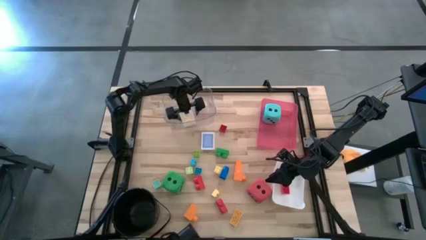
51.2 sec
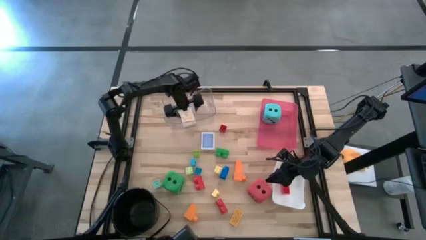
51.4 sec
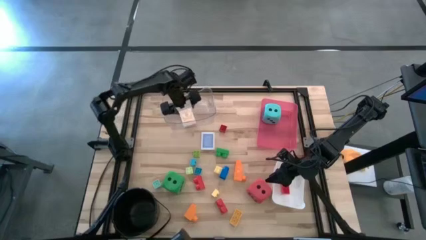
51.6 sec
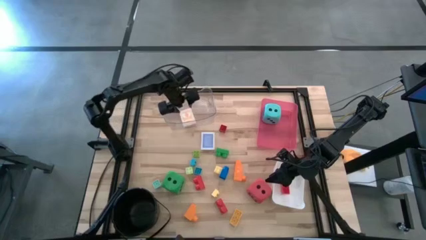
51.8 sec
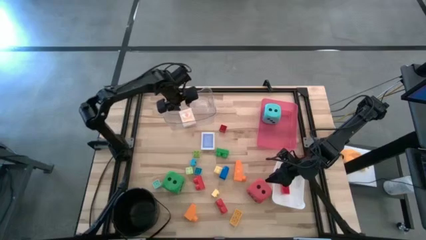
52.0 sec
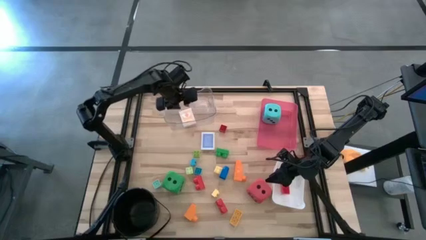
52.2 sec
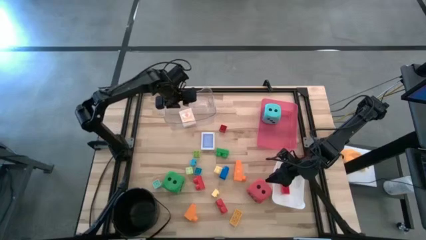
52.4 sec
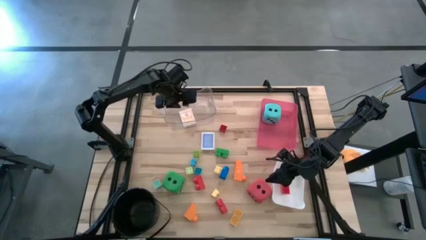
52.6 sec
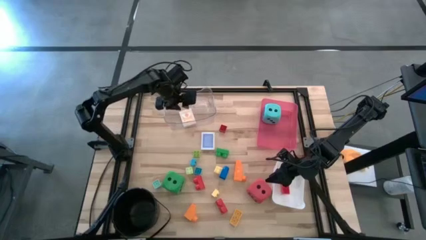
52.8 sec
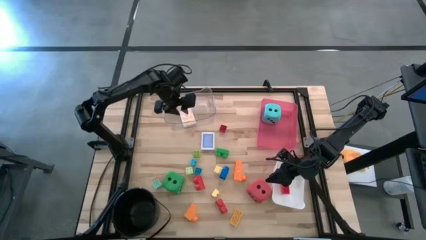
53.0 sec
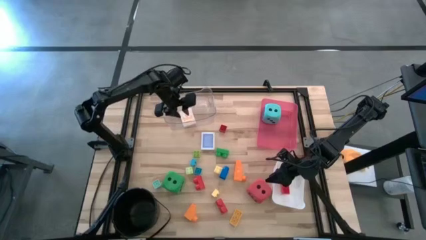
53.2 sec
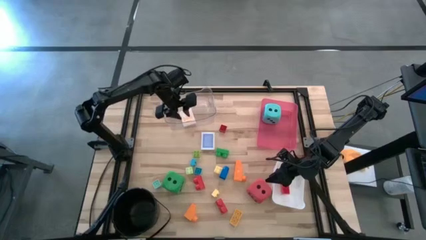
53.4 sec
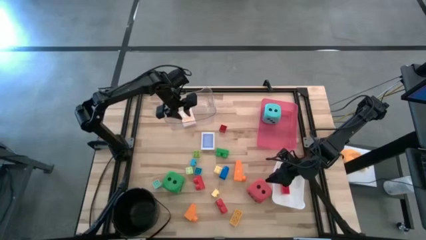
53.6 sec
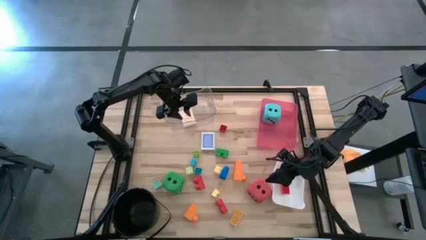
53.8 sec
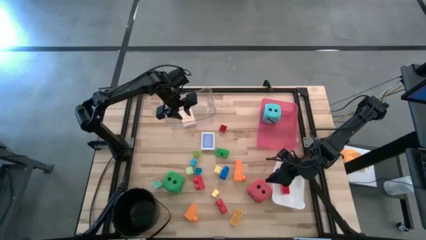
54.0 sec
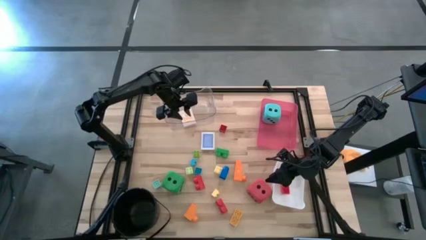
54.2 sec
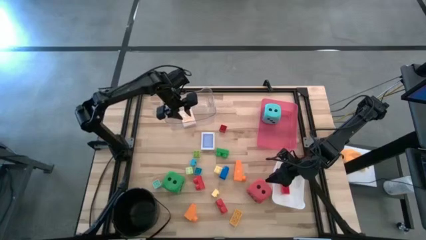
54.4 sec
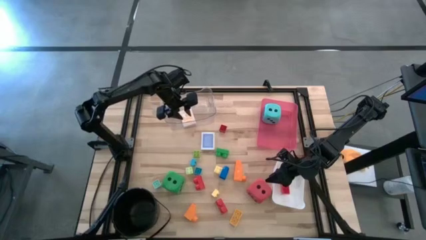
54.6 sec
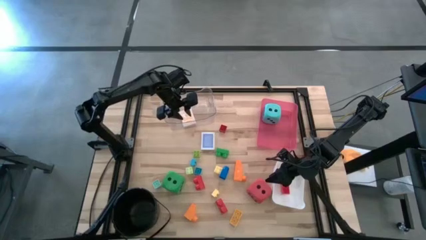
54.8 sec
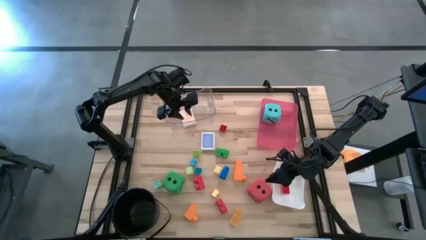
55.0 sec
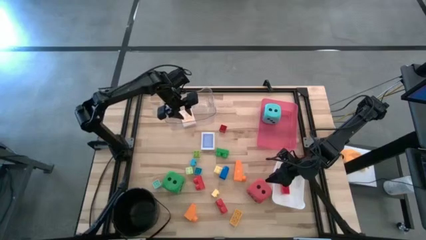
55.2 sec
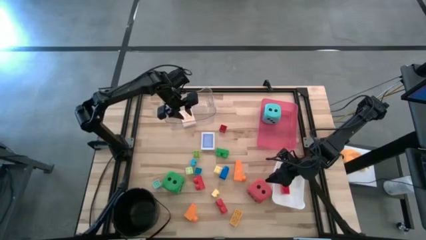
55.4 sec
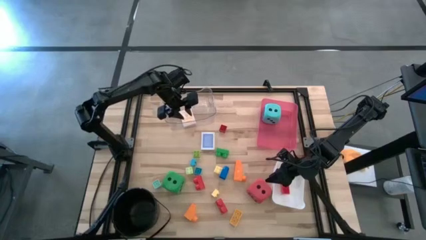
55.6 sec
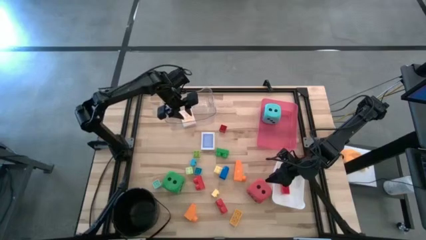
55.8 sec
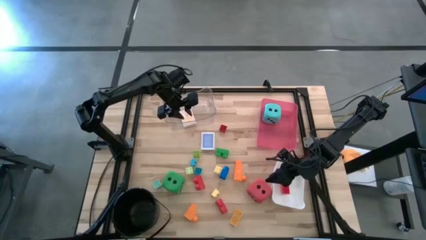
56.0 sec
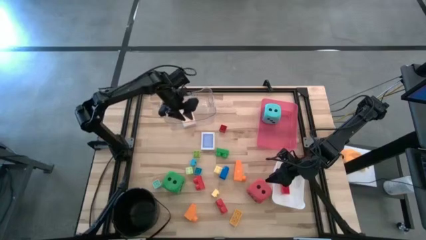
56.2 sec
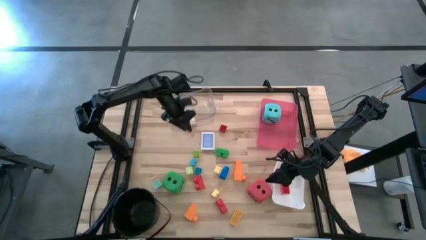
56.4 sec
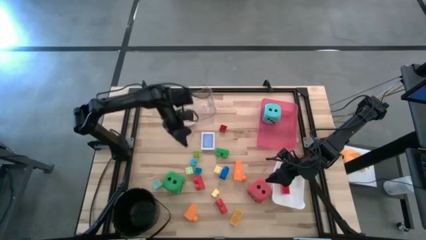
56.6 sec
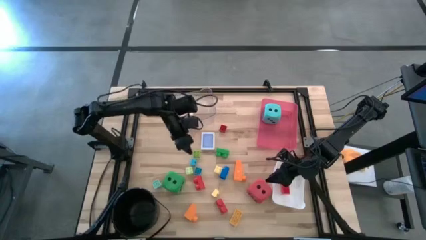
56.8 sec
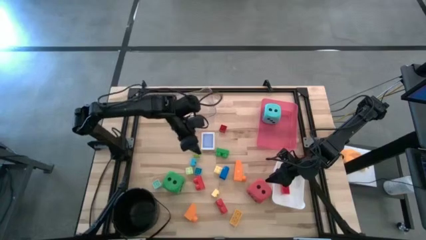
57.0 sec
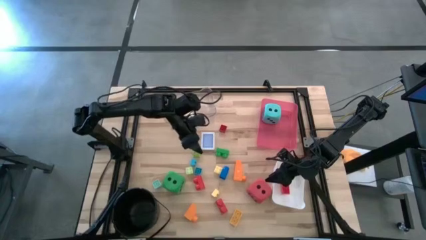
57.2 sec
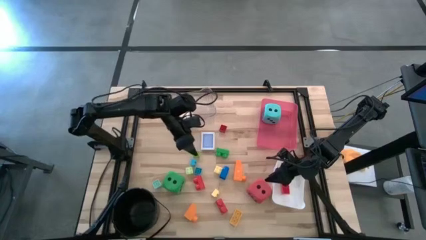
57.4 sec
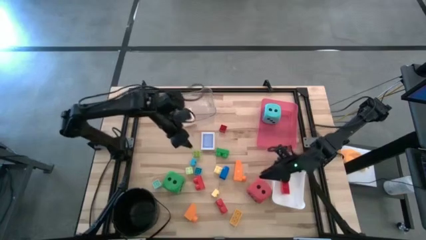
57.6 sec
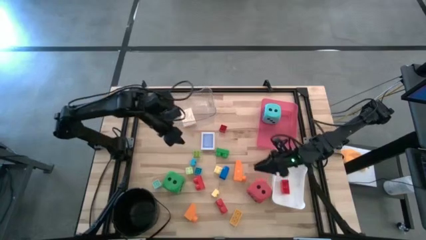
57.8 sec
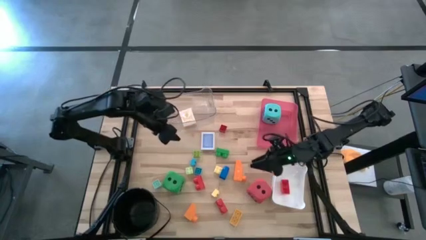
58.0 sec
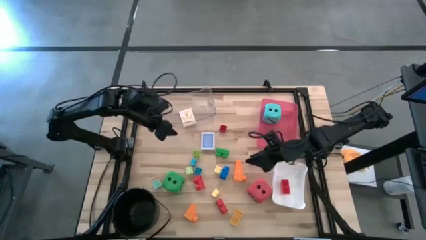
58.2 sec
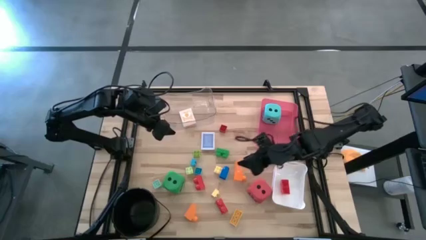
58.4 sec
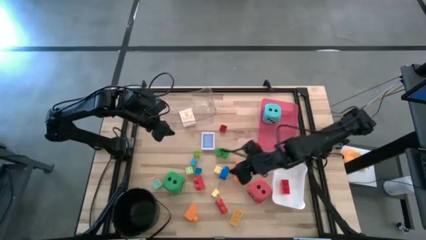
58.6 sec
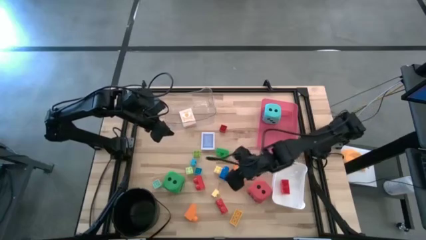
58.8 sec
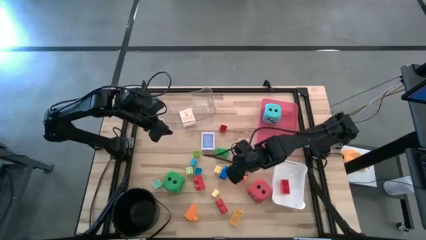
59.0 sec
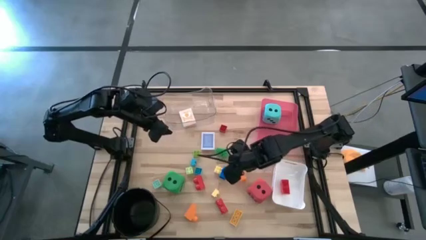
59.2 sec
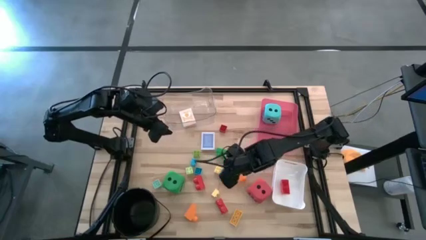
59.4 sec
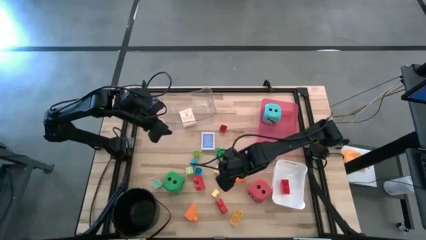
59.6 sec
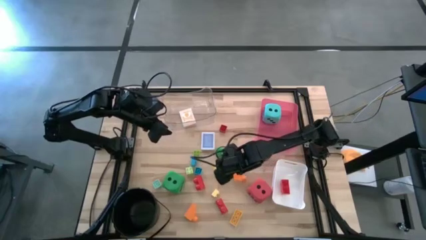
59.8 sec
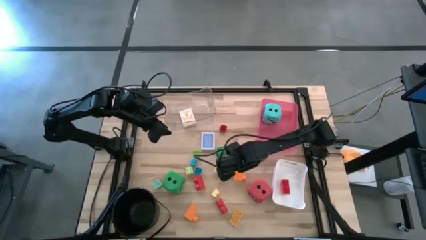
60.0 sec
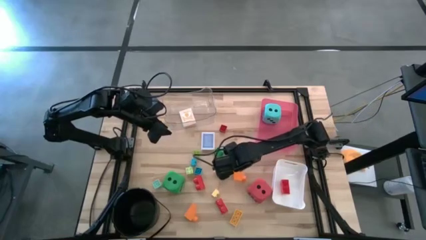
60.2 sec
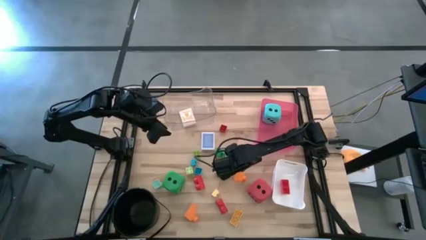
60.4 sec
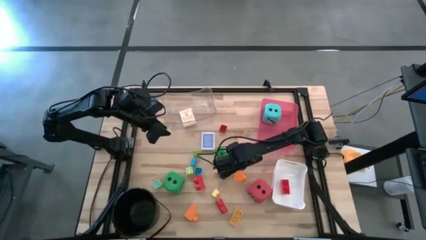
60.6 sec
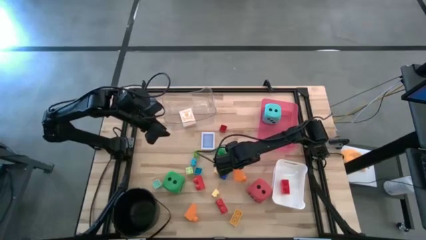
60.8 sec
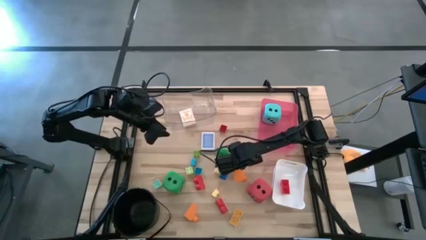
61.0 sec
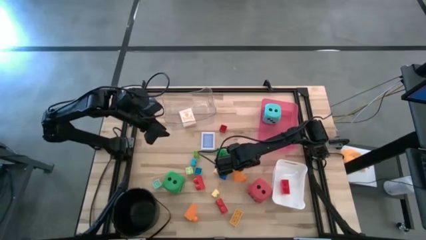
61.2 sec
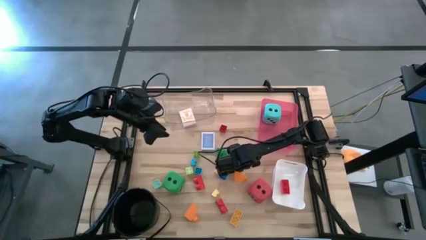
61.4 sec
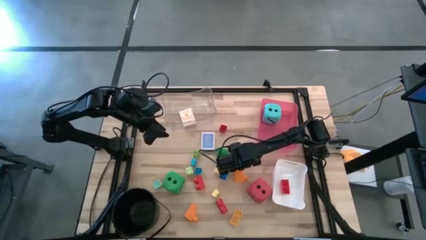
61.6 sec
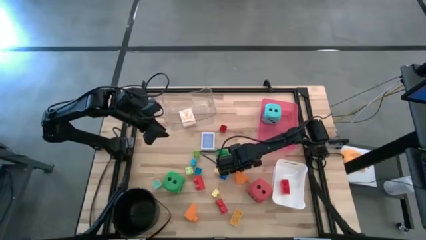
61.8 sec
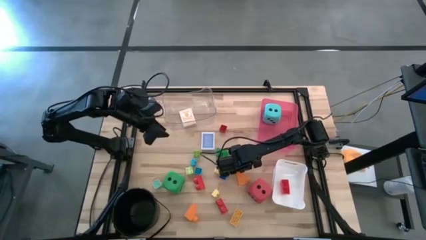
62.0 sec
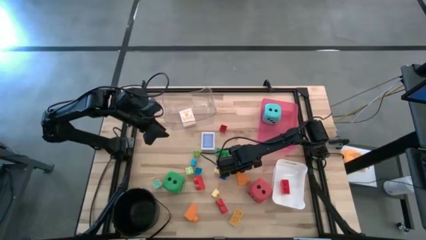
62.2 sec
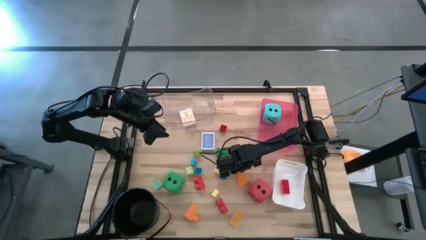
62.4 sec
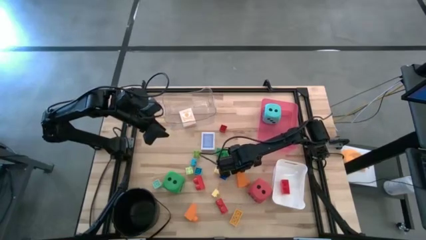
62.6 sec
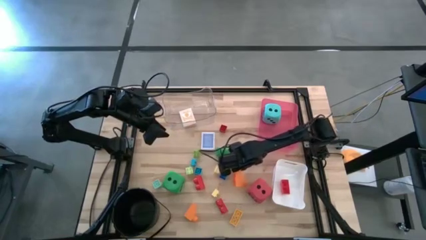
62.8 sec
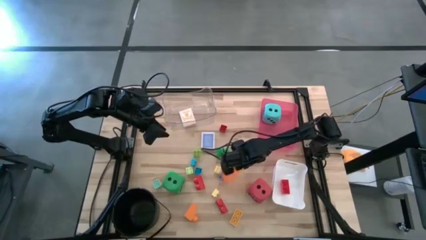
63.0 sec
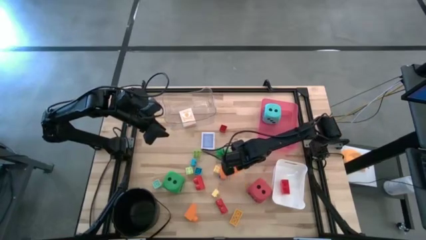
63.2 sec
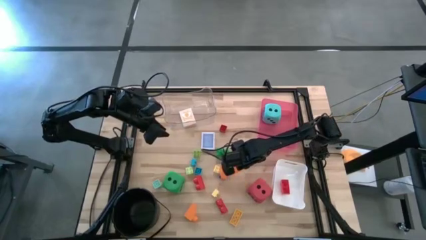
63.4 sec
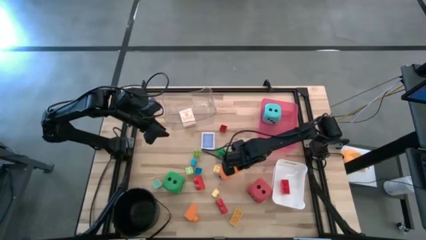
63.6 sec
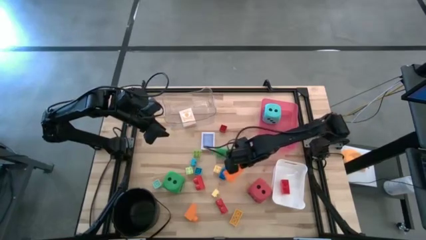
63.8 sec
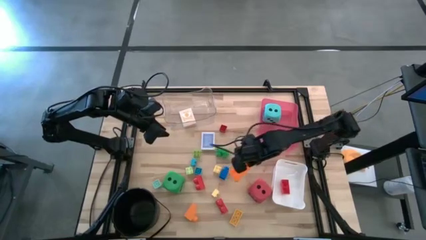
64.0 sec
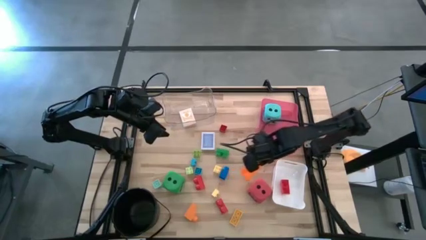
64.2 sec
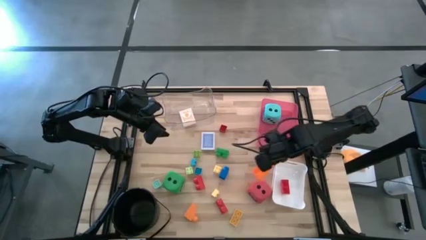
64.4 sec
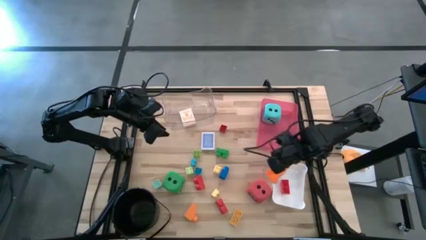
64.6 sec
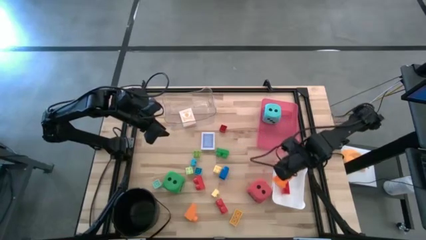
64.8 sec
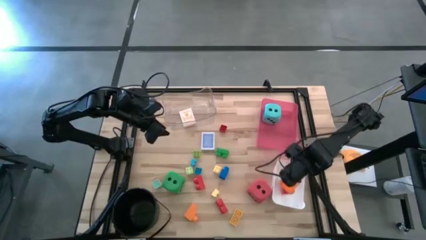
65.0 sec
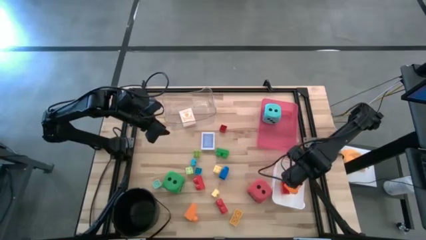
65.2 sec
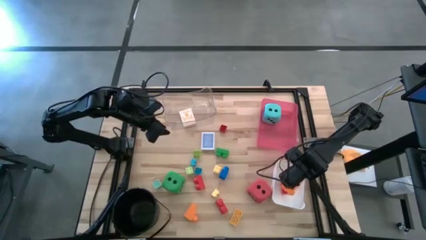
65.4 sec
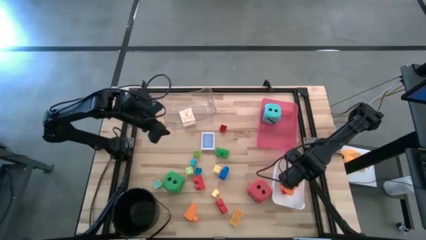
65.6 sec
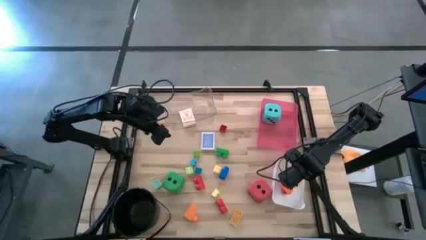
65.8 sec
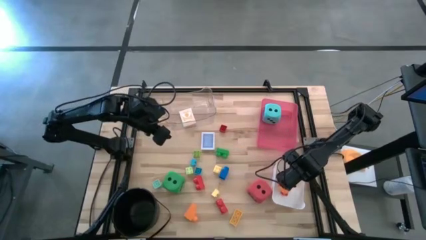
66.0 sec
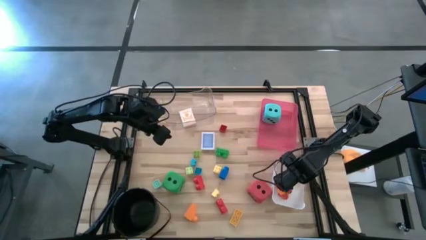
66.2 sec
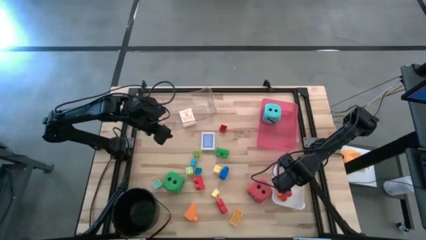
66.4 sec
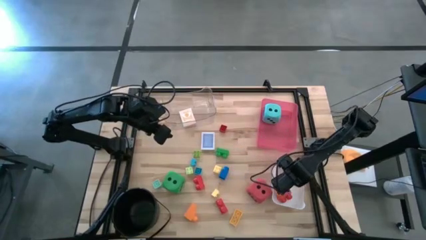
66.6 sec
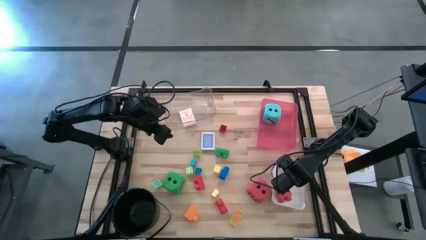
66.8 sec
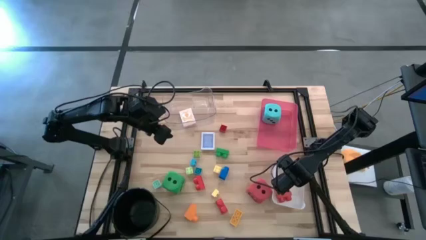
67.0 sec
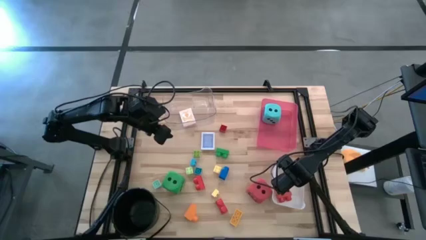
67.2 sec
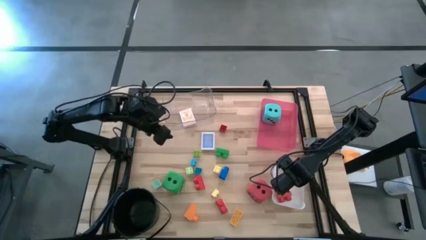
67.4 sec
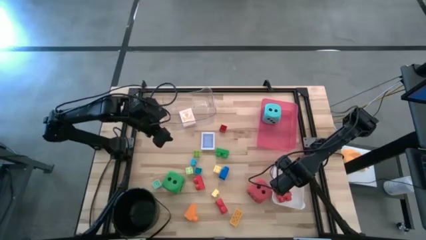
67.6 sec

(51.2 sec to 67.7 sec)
Task: Pick & Place Toys
Put the orange game piece into the white bin
